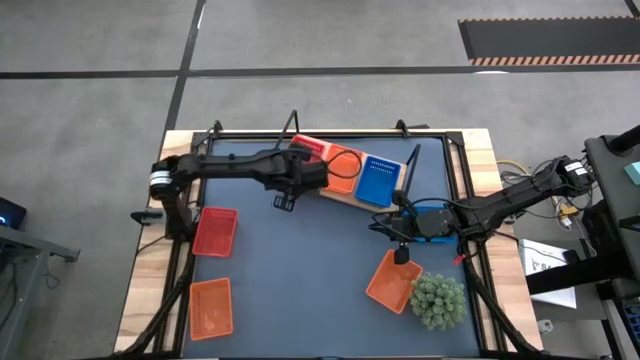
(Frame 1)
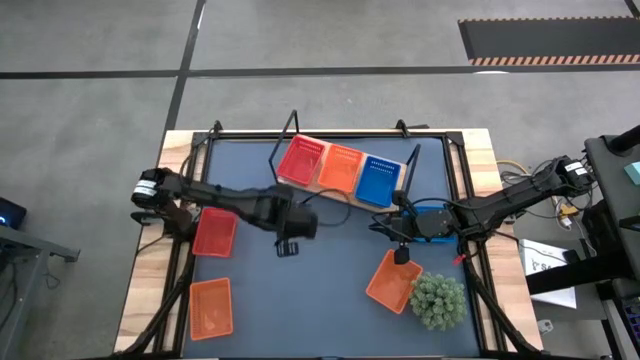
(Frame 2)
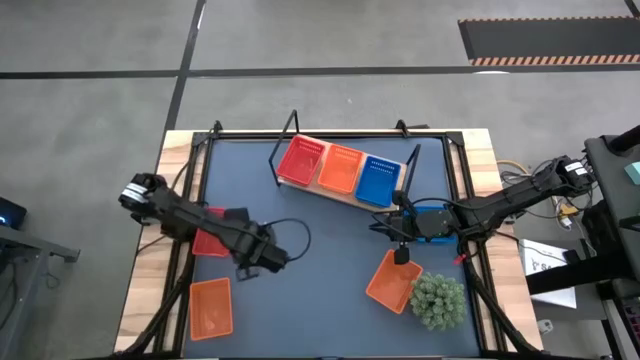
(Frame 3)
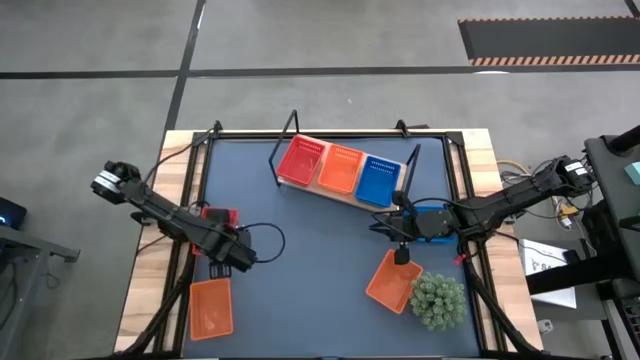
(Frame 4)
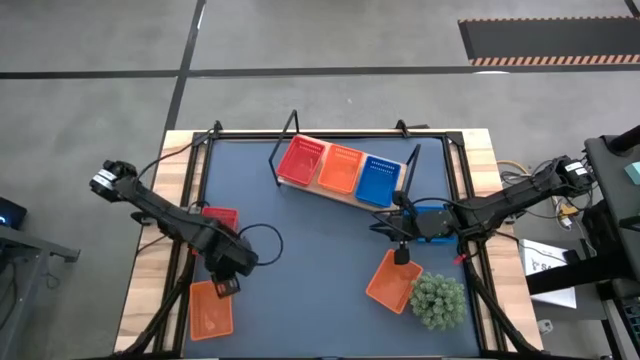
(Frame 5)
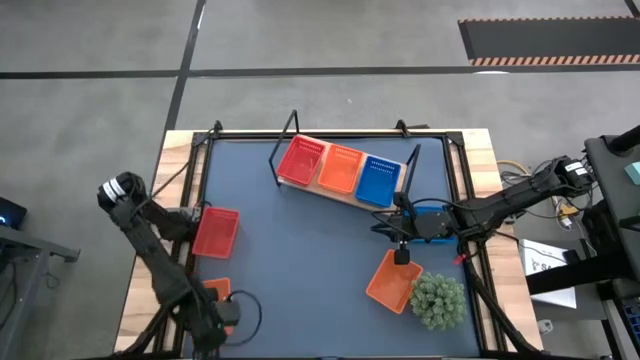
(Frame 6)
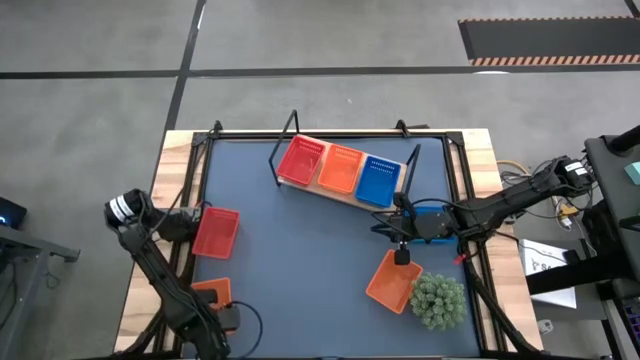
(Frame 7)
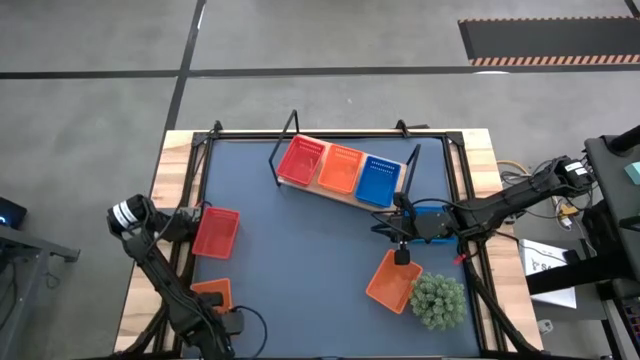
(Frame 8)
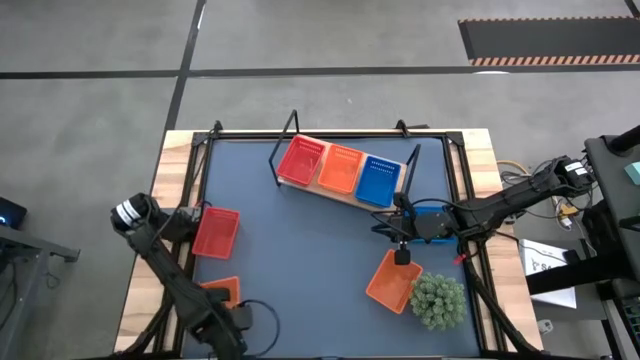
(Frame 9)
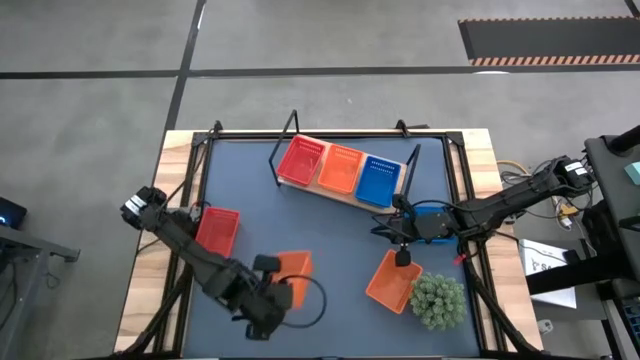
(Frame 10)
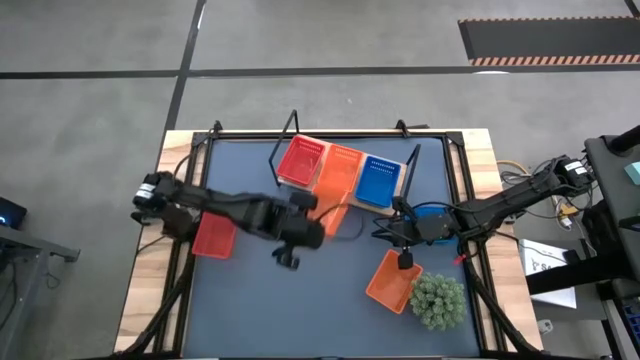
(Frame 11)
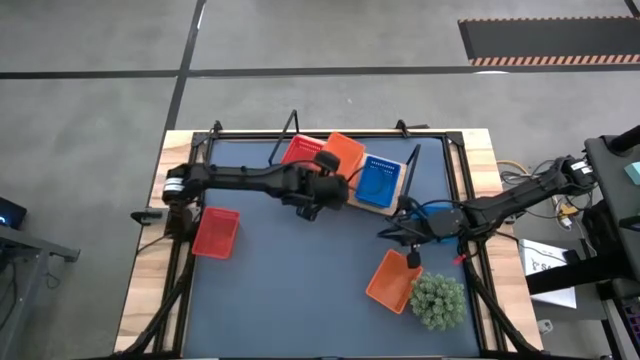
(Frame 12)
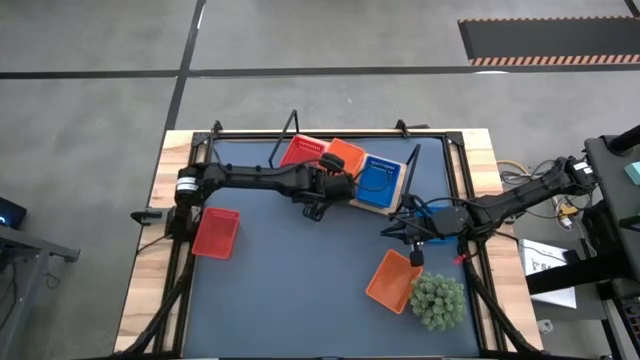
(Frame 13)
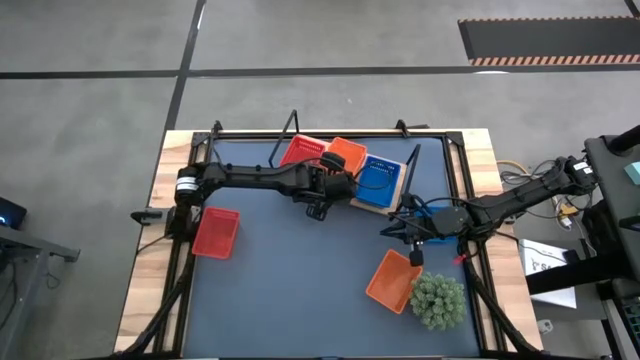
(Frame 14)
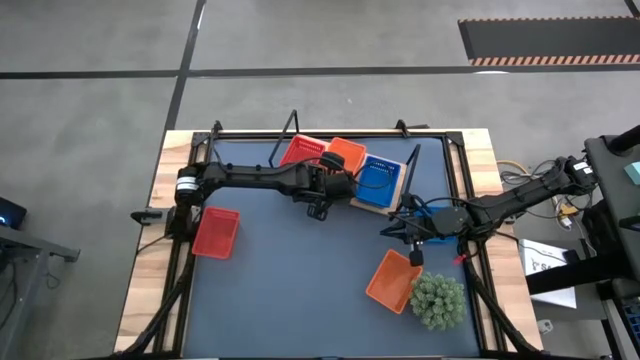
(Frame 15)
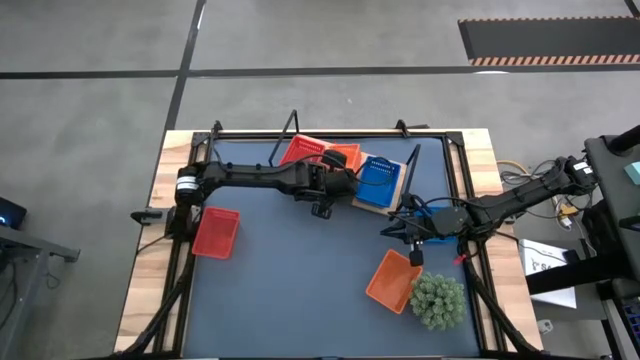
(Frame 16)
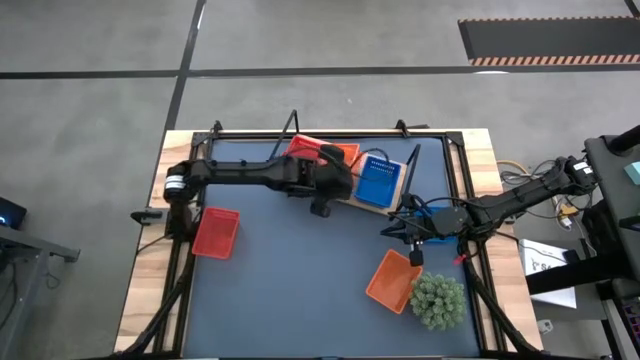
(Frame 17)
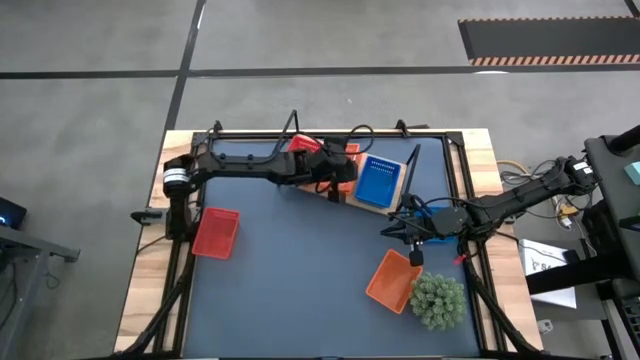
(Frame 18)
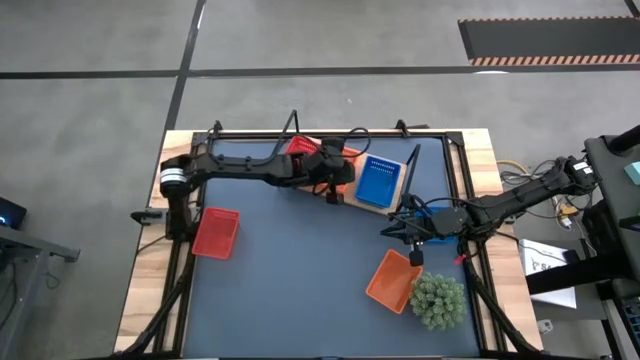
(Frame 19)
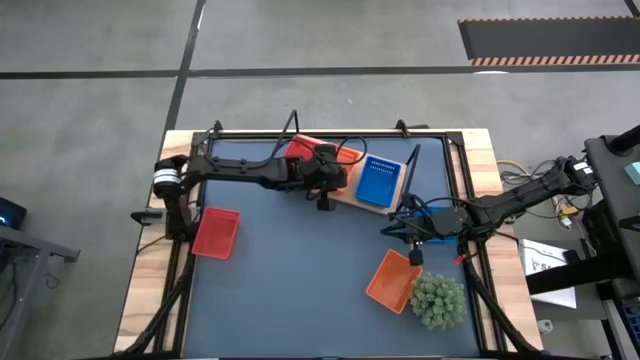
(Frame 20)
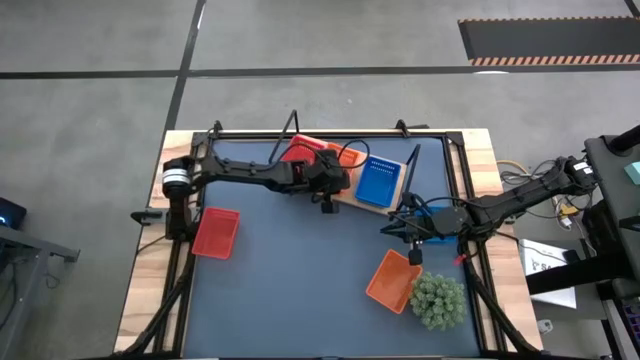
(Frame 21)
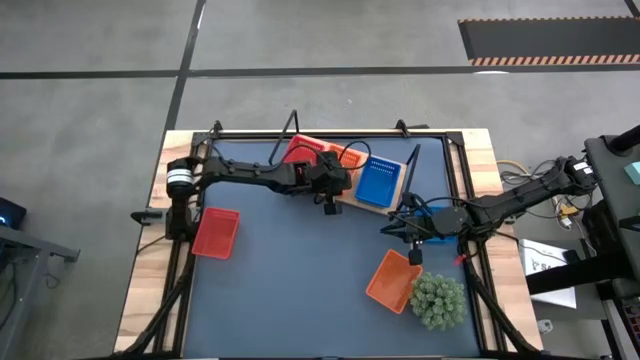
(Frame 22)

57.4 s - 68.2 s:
Task: Stack baskets on shelf by color
Stack the left orange bin on top of the orange bin on the shelf

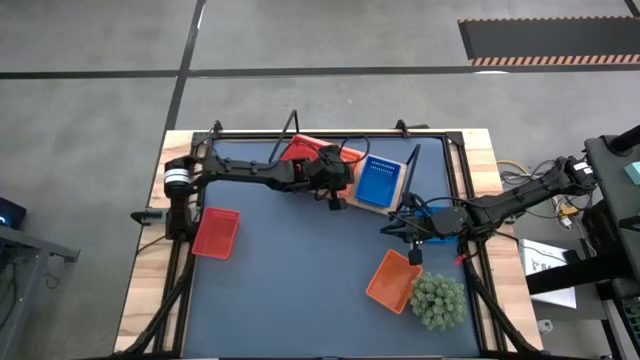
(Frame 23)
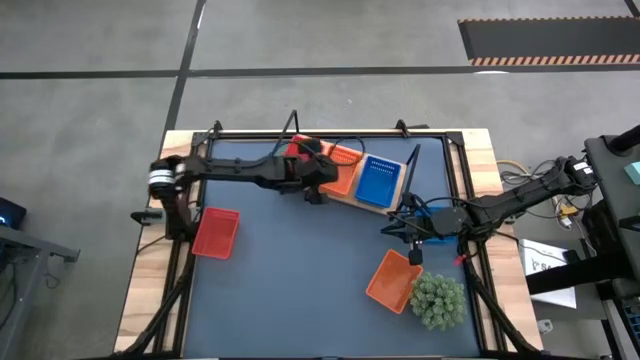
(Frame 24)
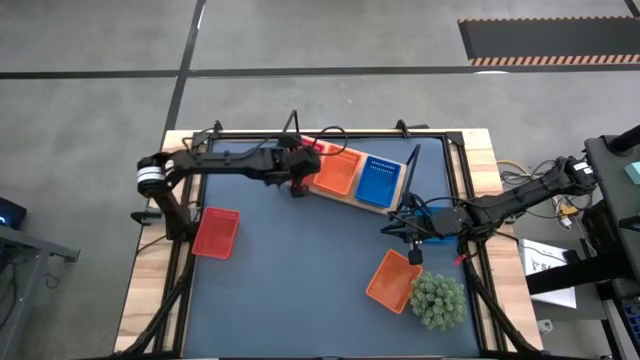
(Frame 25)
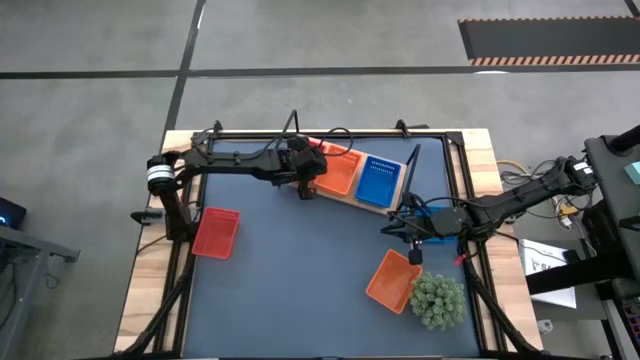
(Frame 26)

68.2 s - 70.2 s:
Adjust the stacked red bins

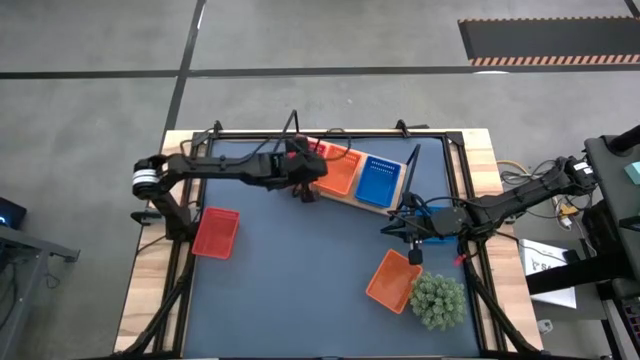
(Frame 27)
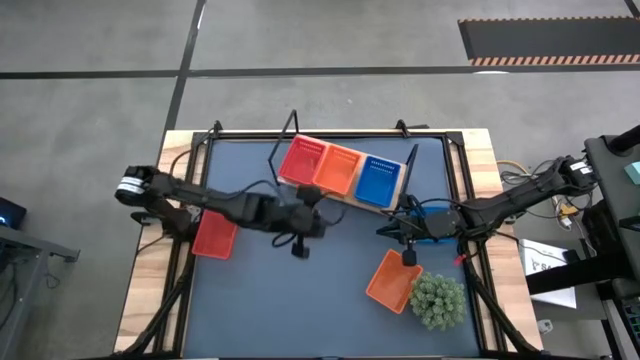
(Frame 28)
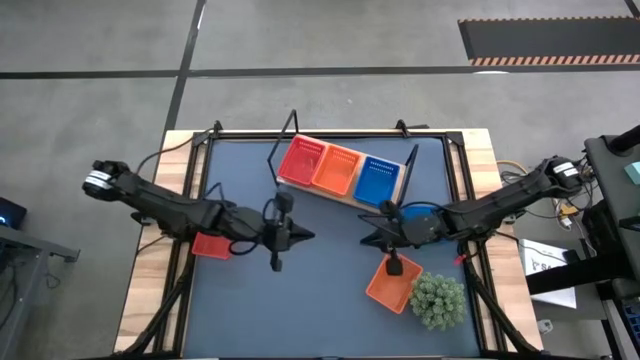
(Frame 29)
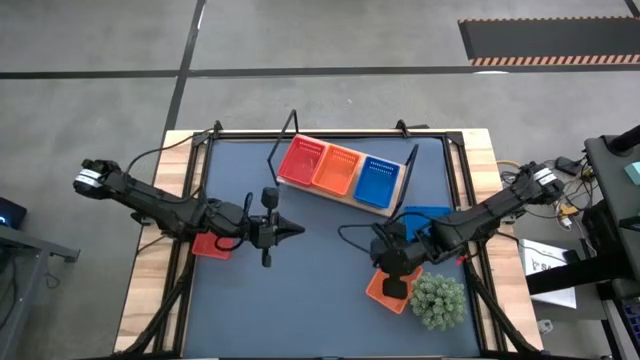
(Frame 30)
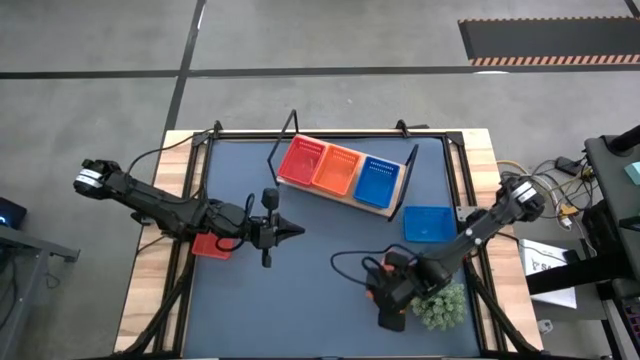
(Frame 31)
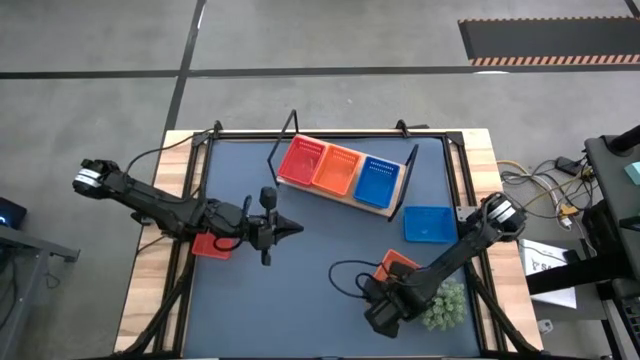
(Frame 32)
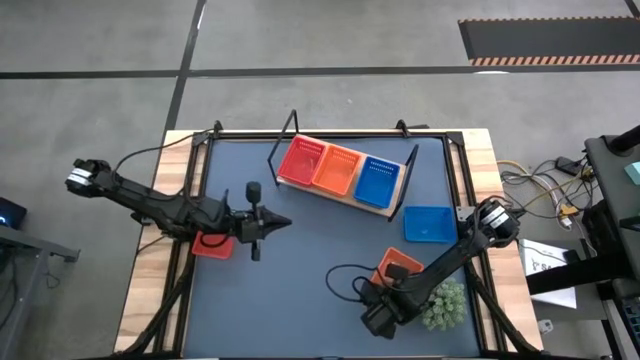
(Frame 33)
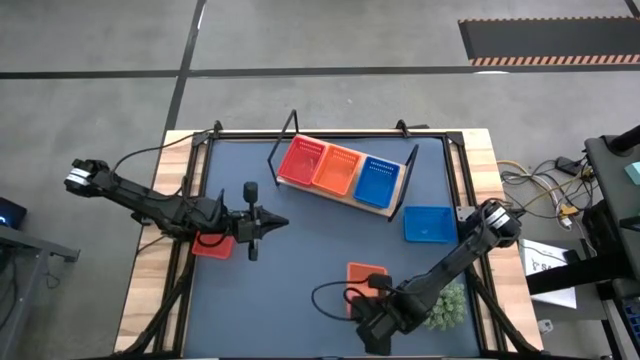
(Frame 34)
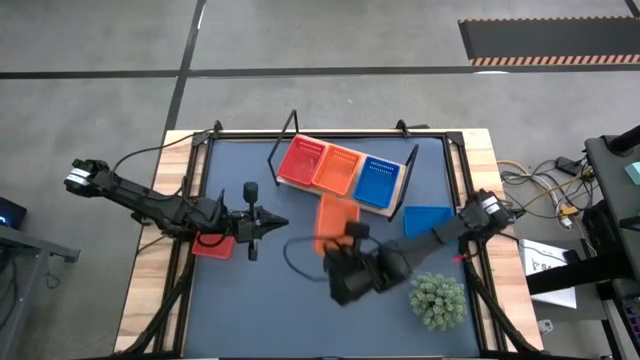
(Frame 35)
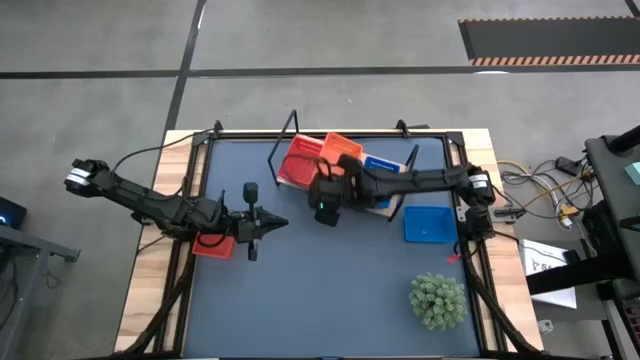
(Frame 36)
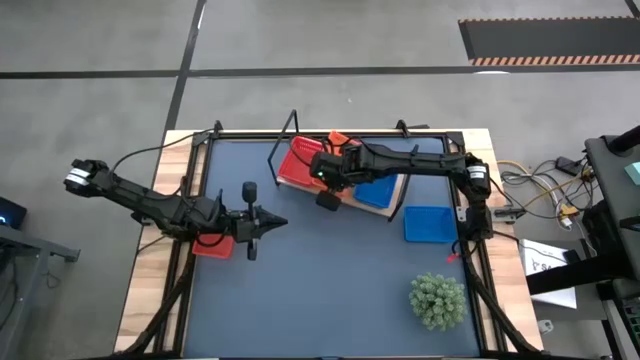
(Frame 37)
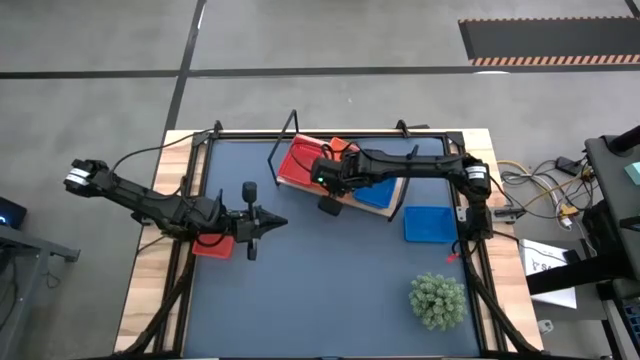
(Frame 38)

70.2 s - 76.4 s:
Stack the orange bin on top of the orange bins on the shelf

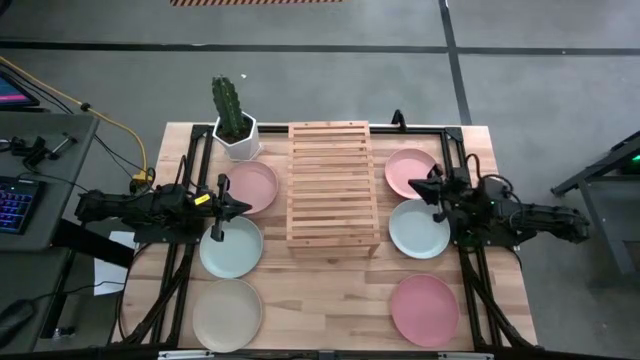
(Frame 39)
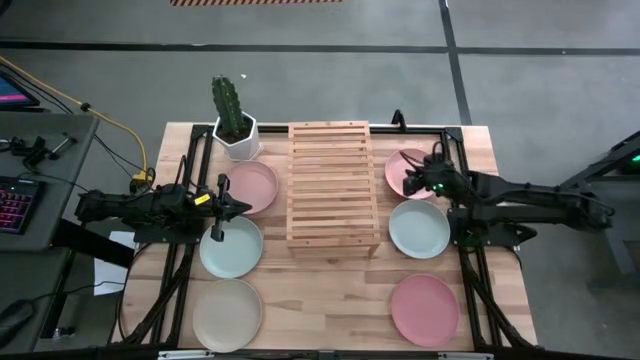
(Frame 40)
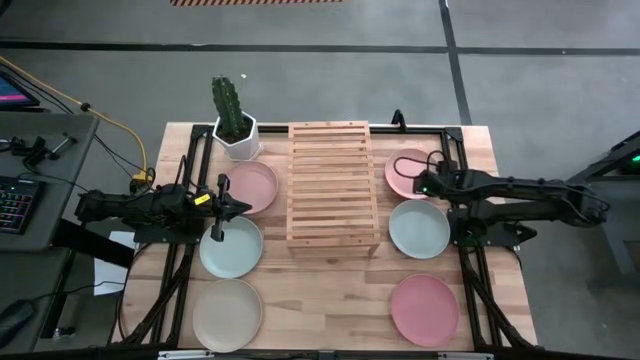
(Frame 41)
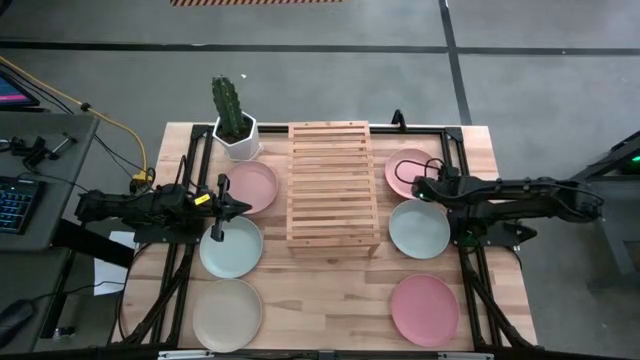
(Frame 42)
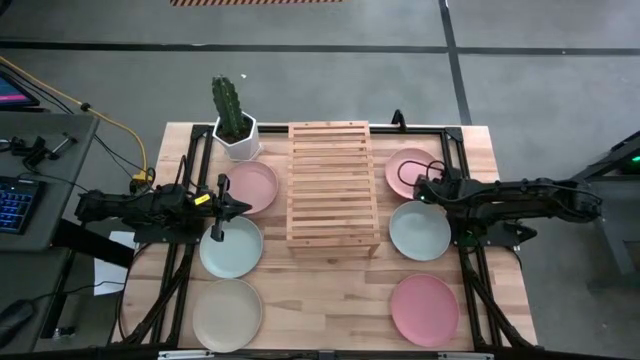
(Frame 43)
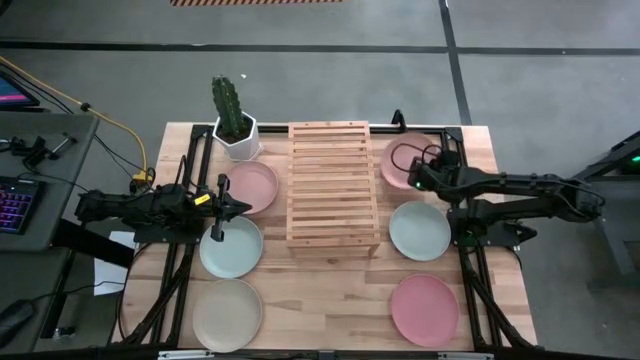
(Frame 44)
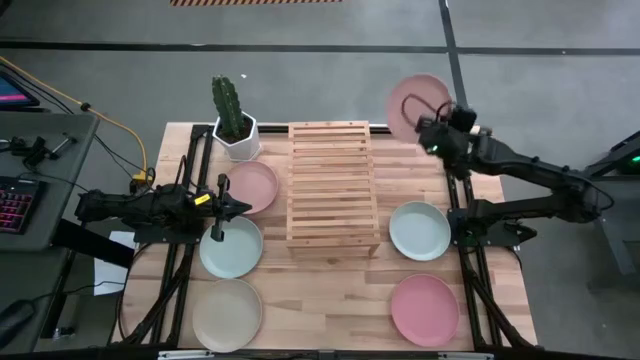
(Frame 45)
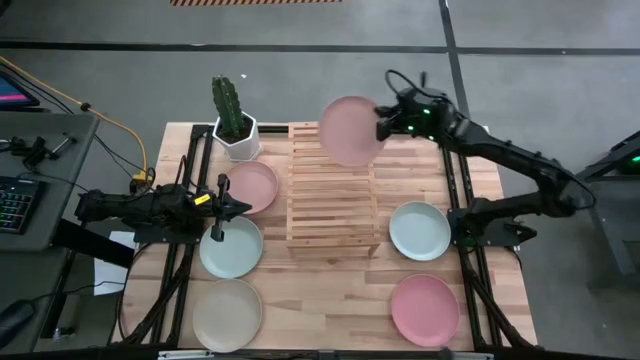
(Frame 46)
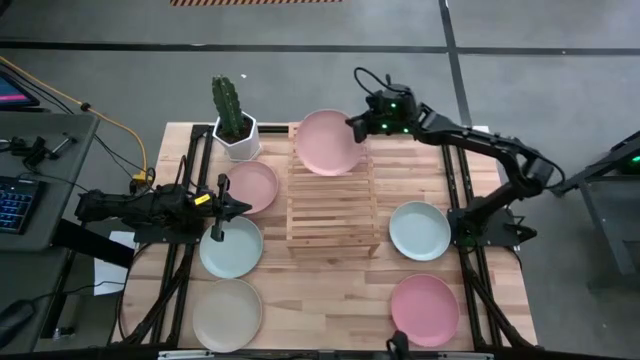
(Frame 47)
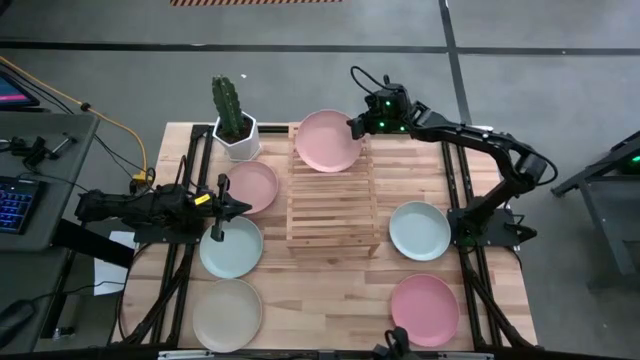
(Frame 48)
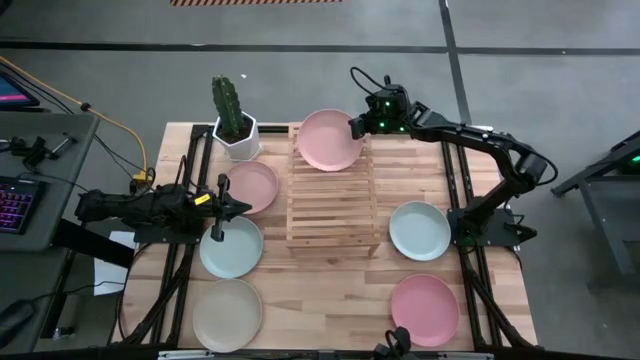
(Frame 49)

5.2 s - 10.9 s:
Task: Place and stack plates onto a shelf
Put the right light pink plate on the shelf
